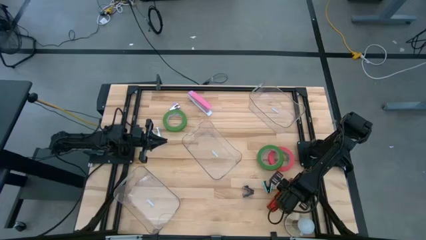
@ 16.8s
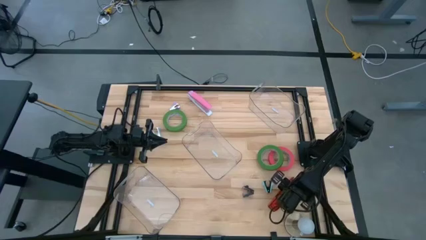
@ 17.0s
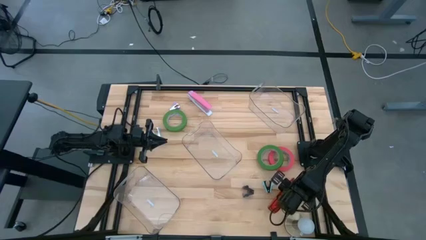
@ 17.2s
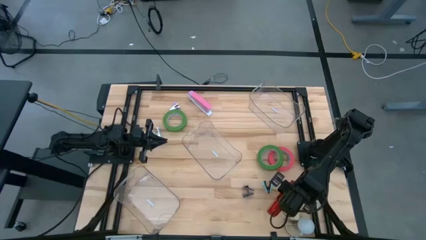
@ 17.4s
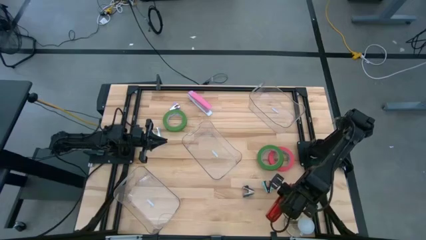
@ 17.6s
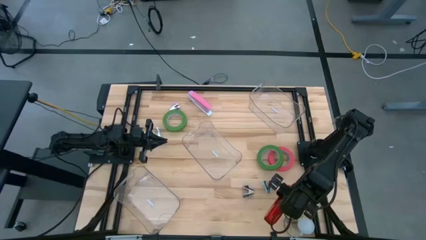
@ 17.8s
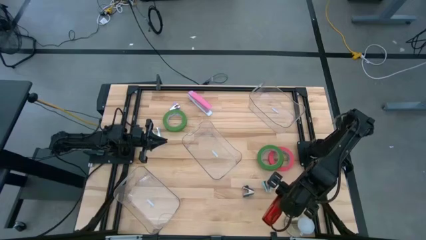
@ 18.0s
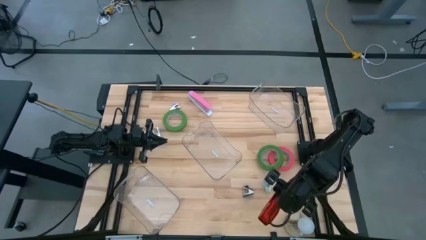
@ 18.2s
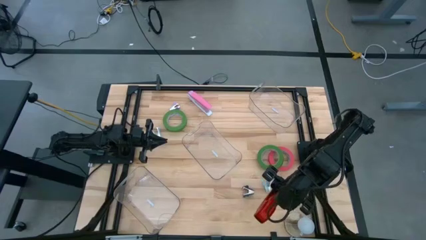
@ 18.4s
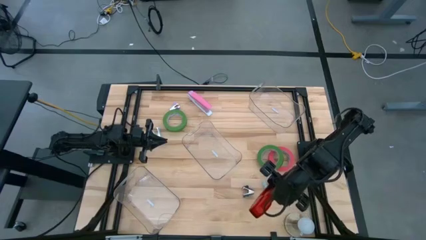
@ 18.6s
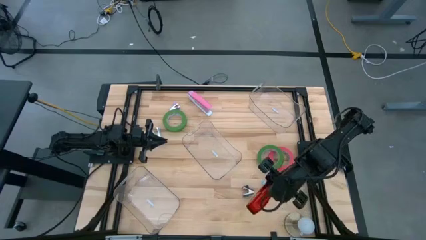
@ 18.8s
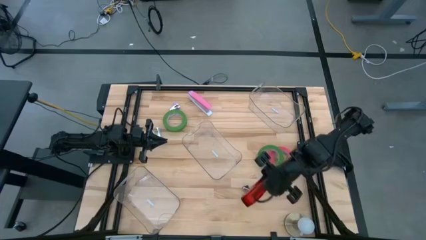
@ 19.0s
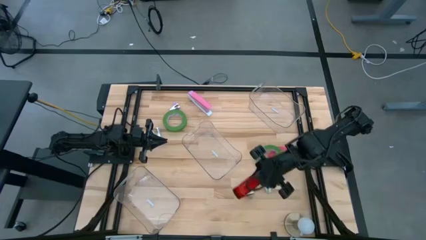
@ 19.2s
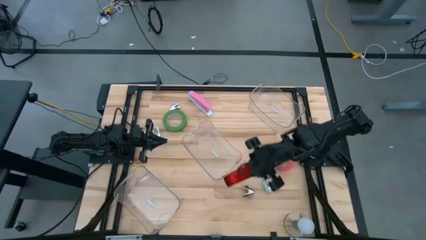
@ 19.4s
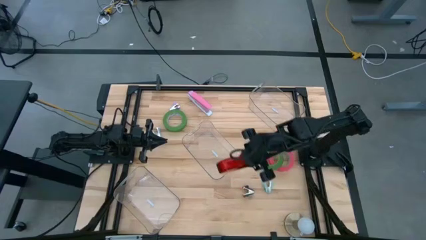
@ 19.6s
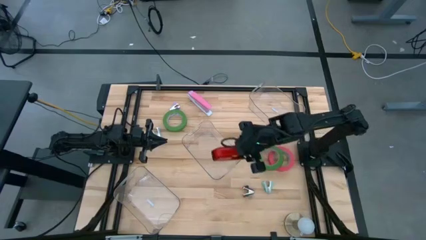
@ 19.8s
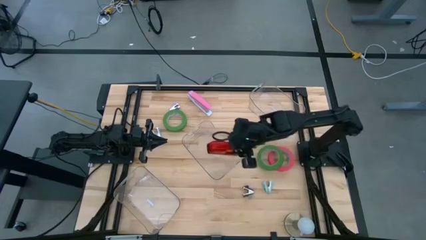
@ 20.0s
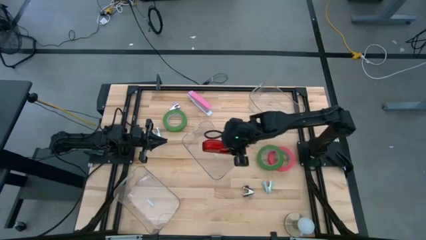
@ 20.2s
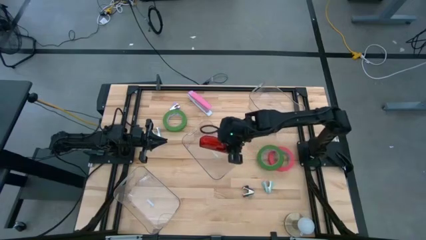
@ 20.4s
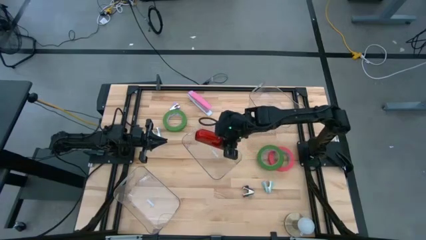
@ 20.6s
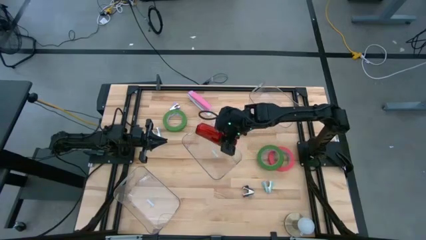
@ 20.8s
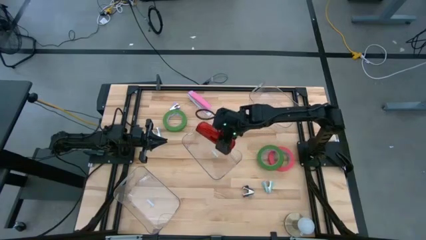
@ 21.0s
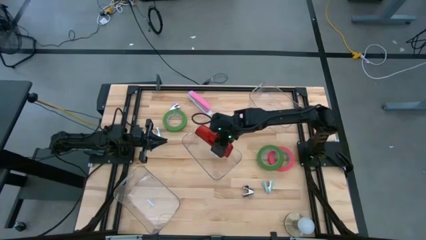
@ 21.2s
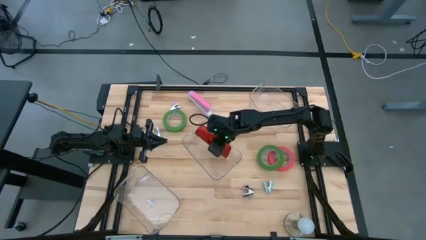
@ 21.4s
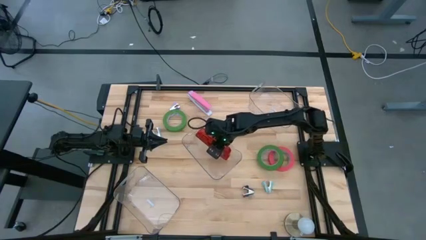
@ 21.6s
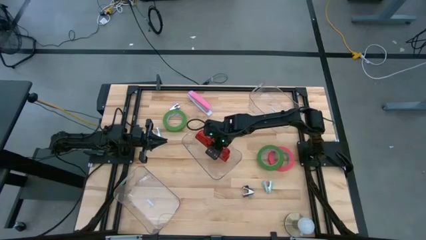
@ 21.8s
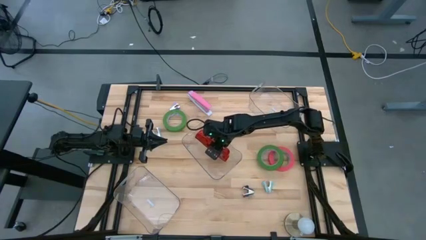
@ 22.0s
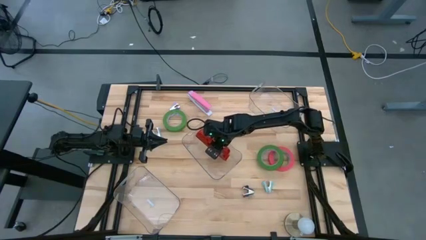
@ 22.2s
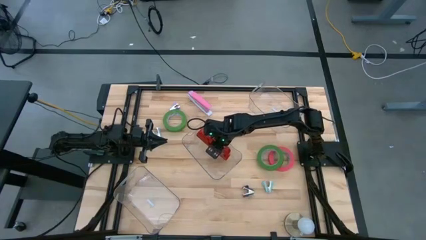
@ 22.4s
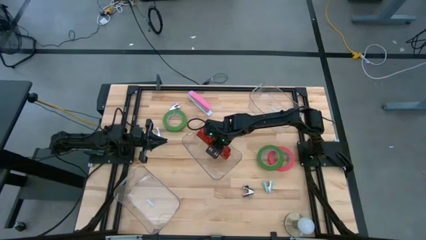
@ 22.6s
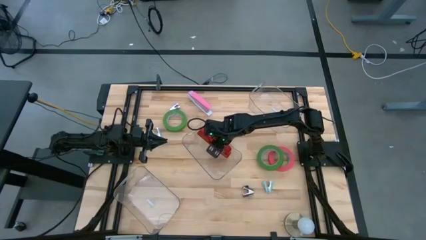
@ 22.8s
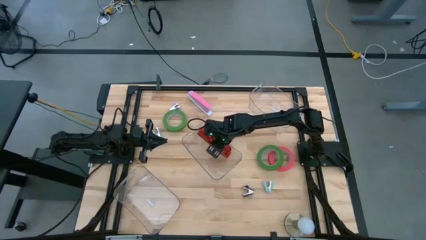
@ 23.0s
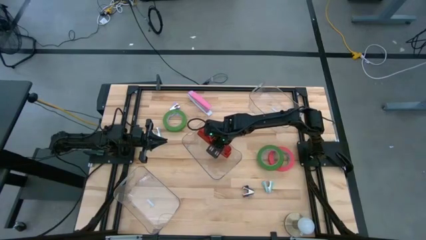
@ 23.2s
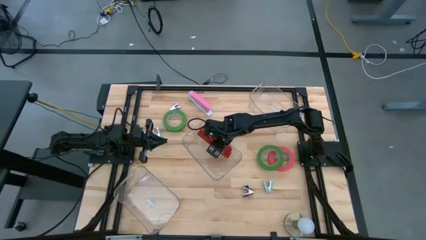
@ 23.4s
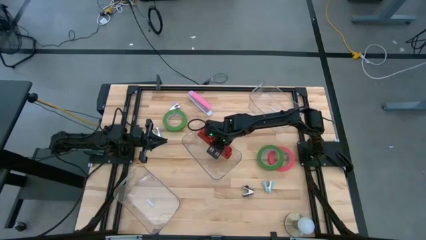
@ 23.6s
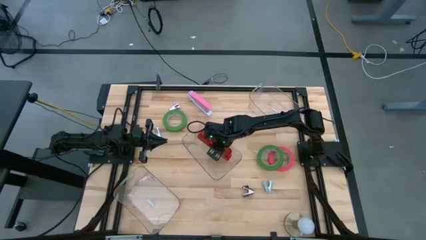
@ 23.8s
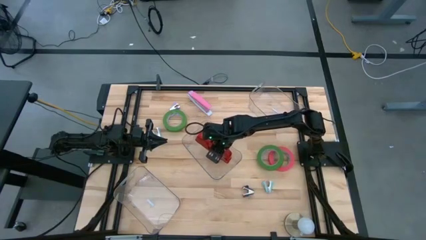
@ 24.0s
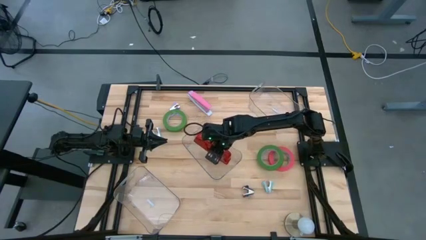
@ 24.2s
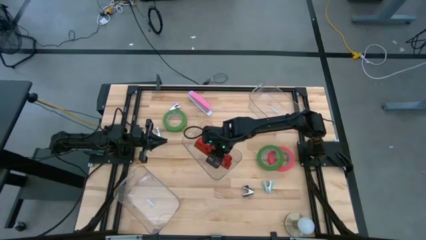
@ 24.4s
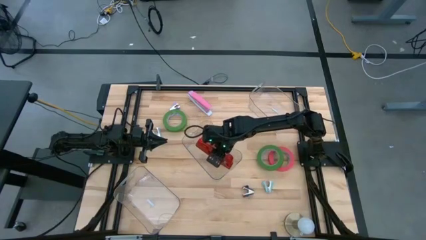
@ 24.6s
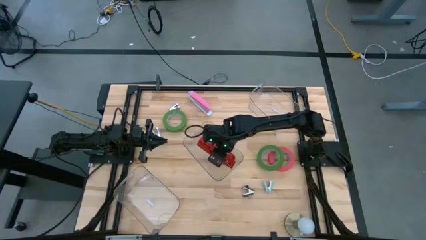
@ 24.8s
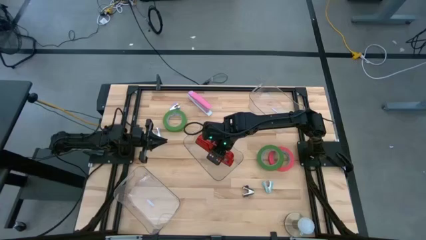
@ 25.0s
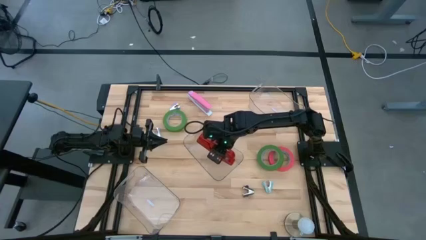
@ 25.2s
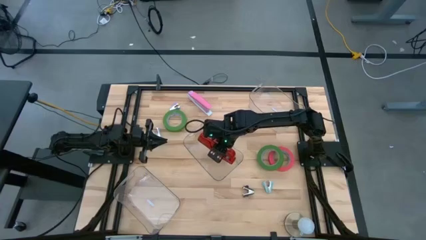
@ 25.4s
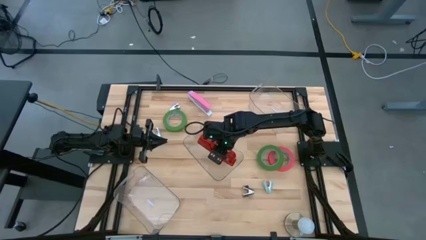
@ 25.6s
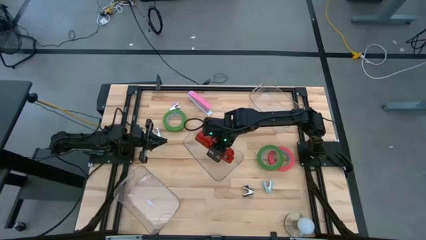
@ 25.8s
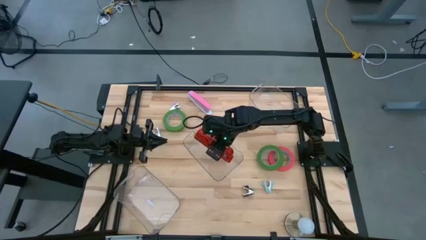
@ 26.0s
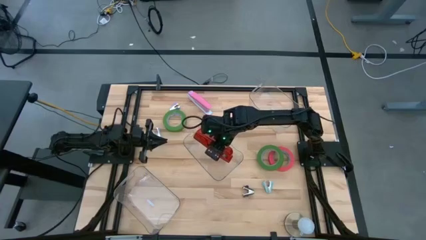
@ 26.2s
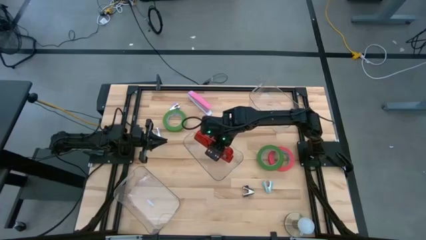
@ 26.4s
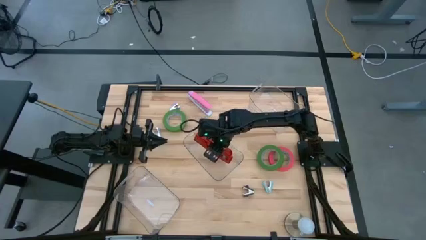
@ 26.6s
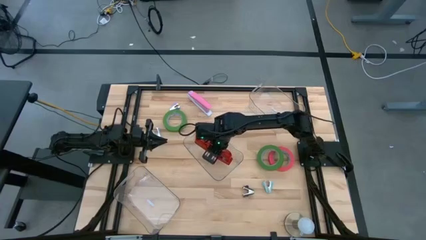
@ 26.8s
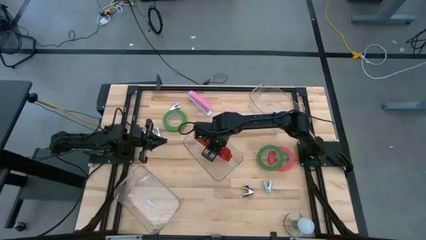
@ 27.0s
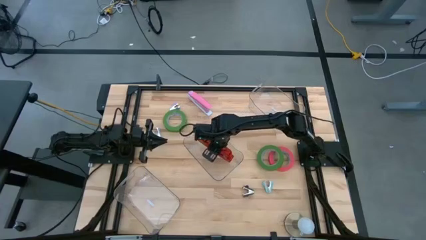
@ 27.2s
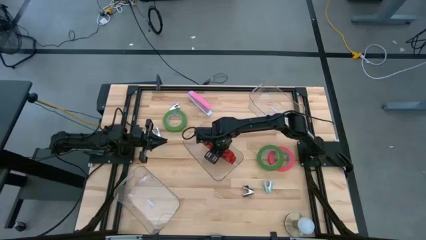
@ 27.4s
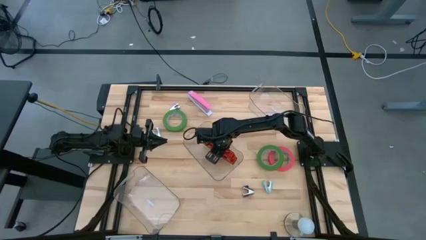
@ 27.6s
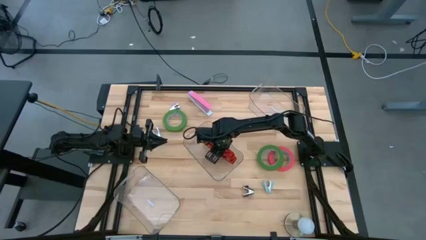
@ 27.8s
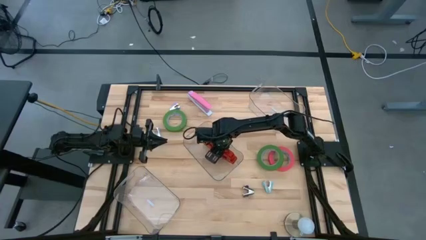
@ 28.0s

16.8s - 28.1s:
Task: Pick and place Stapler, Stapler remover, tape
Put the red stapler into the middle transparent bin

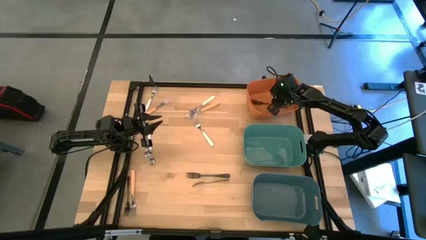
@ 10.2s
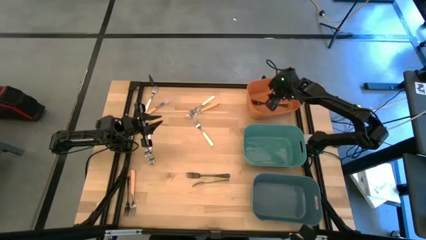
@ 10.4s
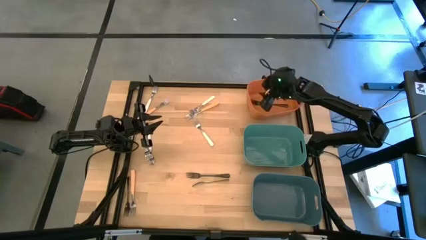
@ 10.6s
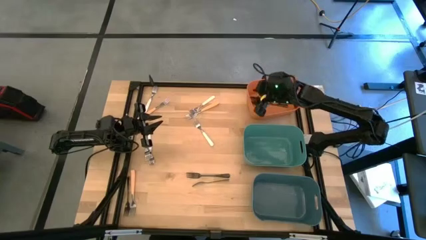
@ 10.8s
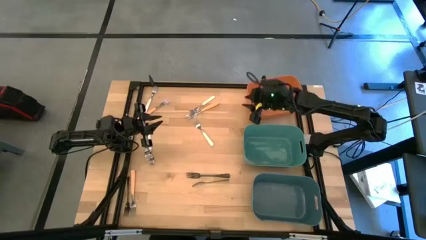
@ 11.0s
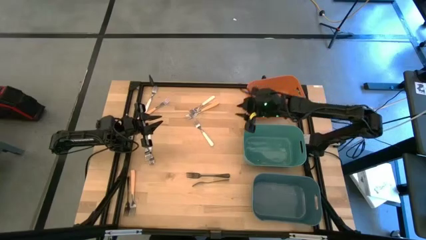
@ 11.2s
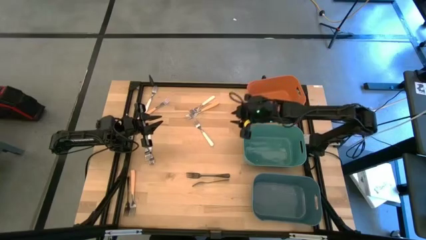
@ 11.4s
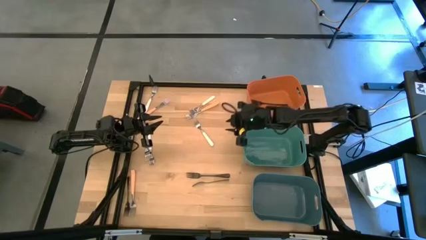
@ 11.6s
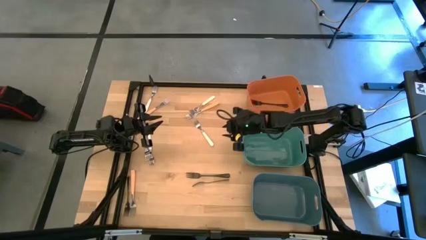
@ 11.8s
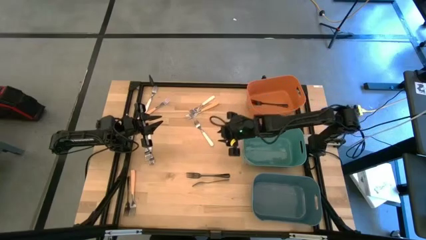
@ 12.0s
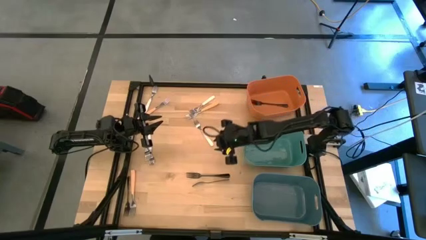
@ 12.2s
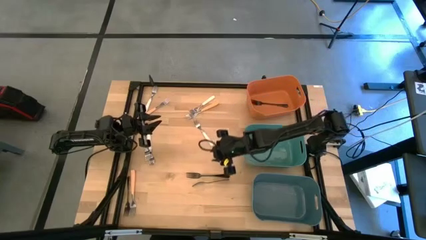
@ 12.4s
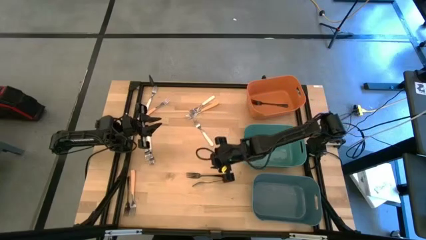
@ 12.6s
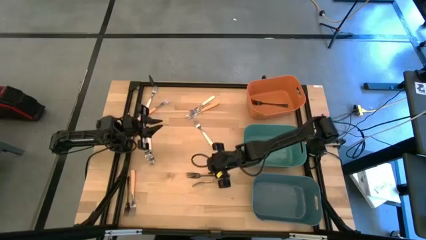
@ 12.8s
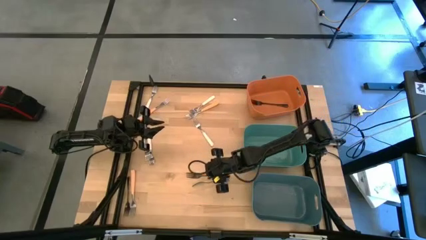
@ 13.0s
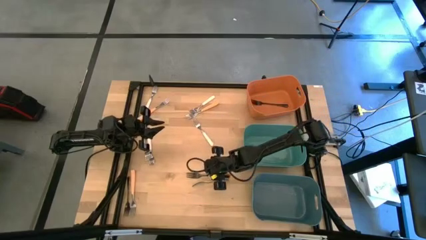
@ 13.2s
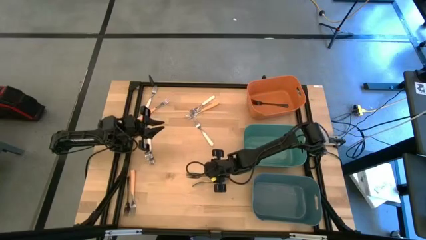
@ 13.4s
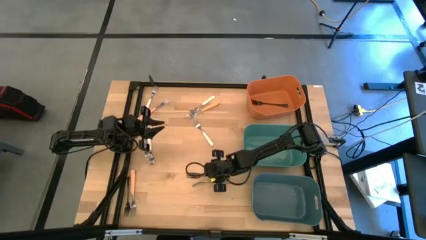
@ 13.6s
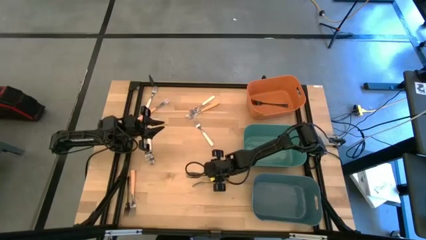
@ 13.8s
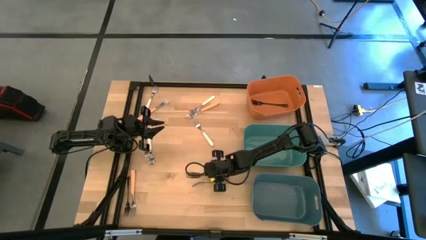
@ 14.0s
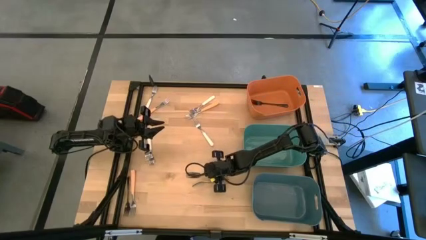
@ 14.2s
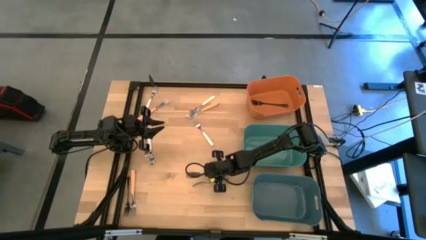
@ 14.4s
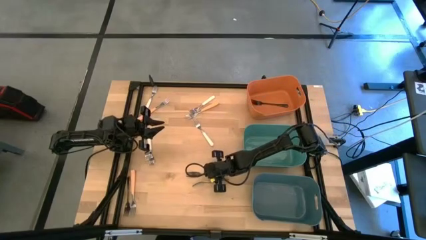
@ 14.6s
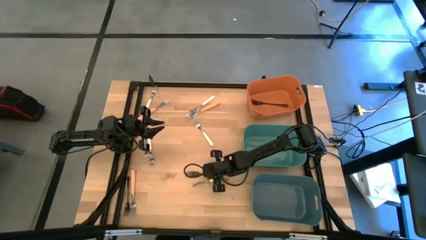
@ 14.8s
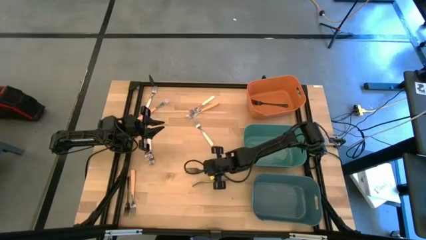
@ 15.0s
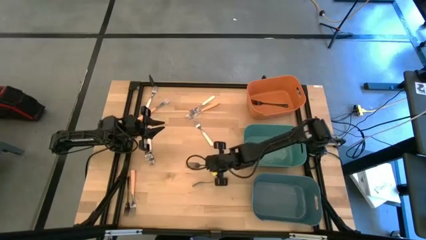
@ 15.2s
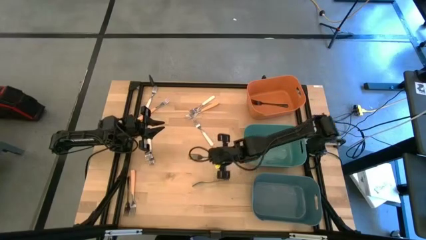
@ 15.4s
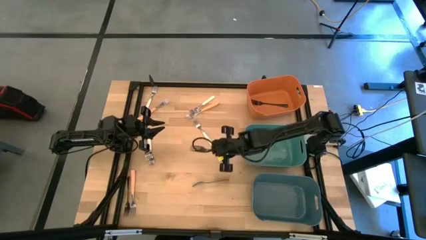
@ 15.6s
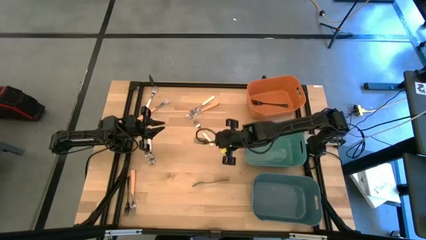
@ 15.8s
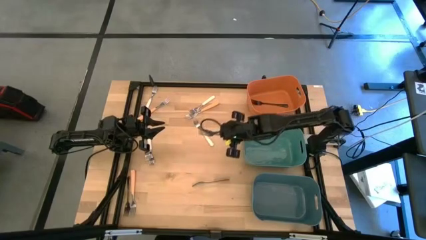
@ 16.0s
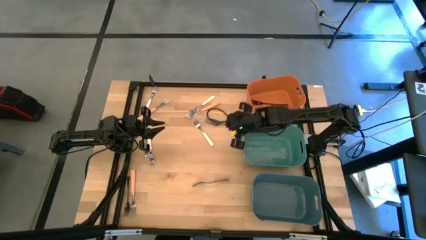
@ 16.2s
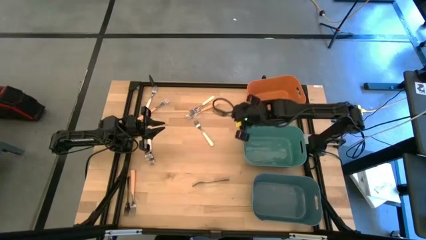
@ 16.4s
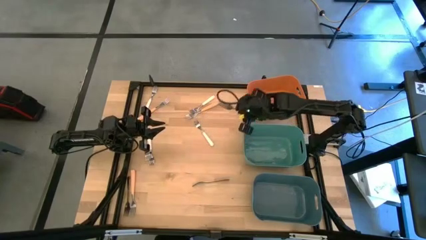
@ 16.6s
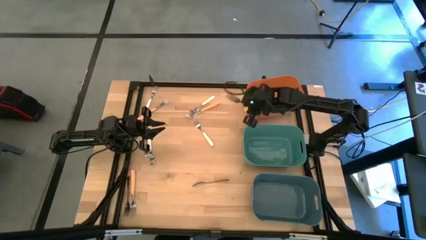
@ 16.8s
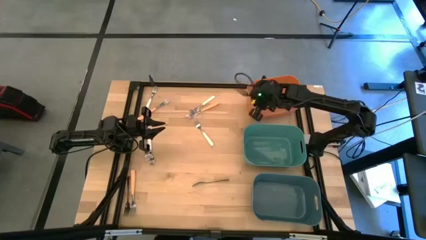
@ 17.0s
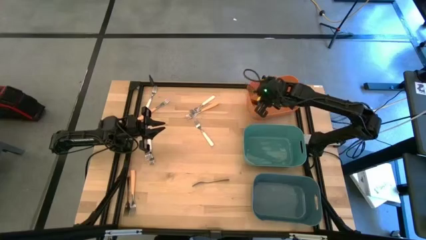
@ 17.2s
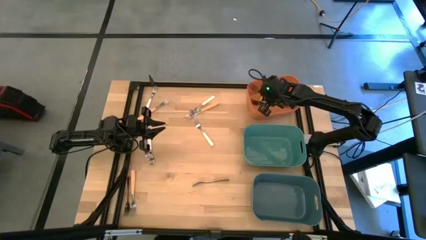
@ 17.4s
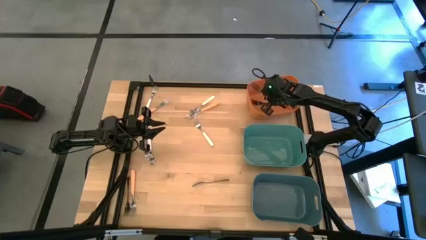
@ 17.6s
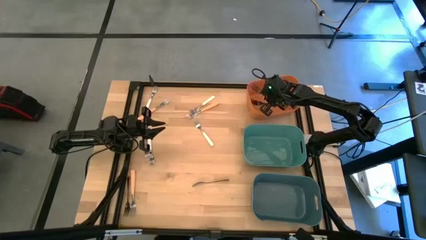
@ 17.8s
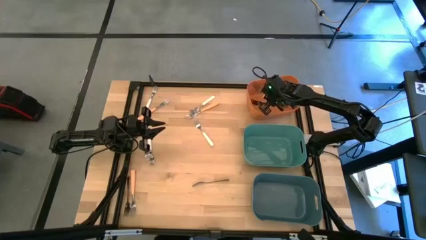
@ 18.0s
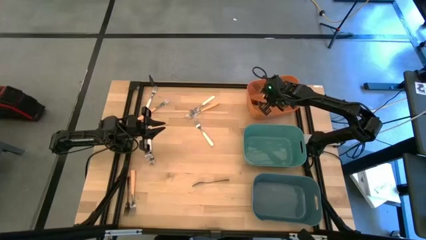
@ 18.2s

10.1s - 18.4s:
Task: Sort silverware by color (type)
Put the black fork into the orange bin
